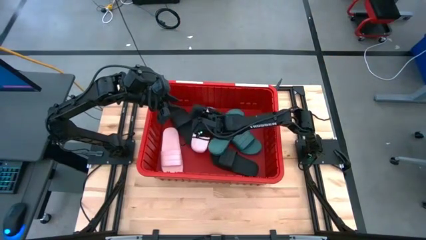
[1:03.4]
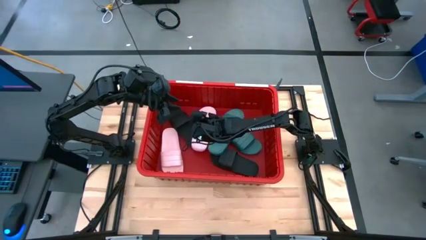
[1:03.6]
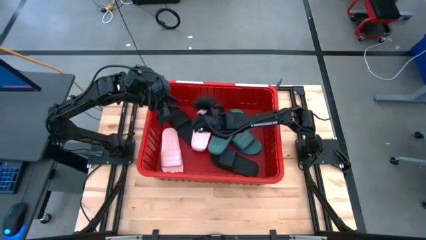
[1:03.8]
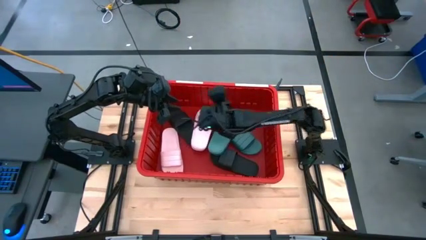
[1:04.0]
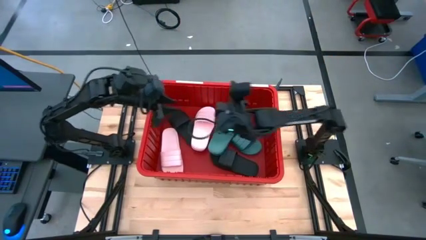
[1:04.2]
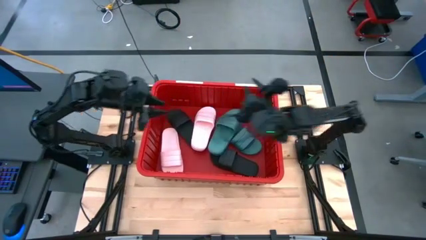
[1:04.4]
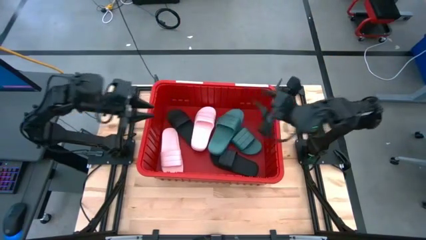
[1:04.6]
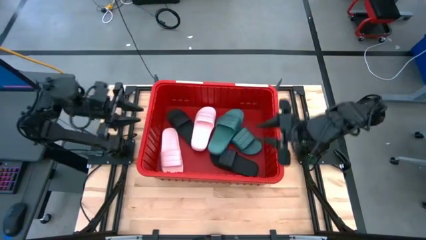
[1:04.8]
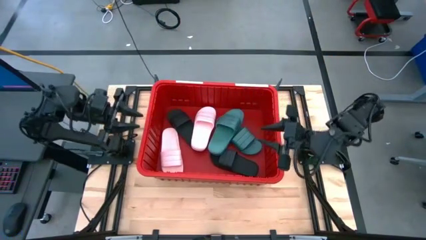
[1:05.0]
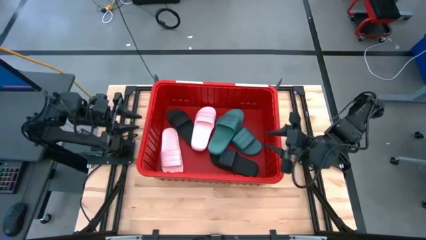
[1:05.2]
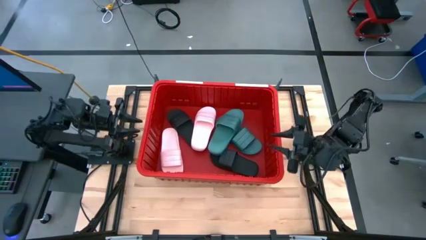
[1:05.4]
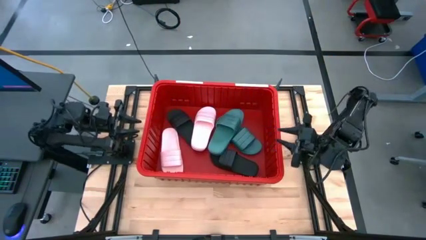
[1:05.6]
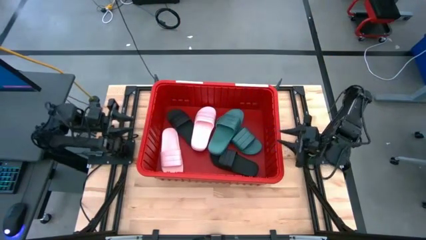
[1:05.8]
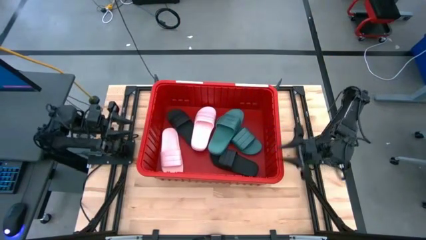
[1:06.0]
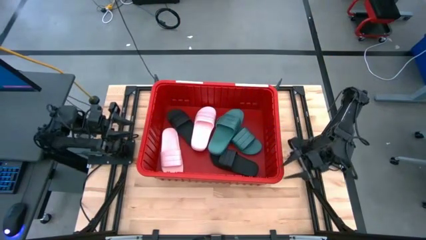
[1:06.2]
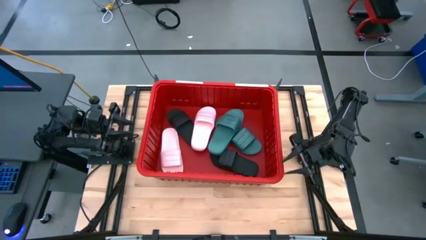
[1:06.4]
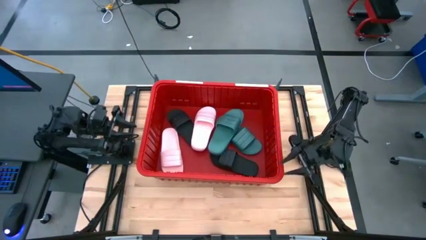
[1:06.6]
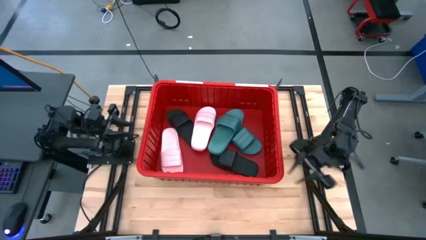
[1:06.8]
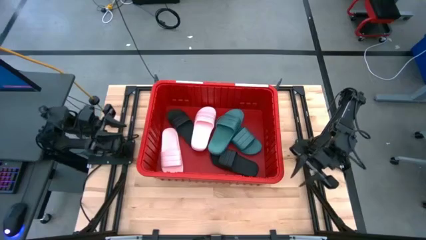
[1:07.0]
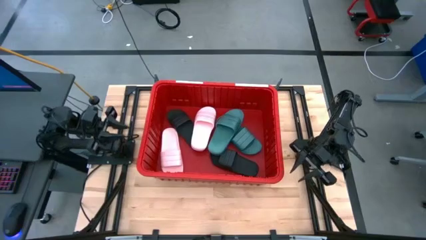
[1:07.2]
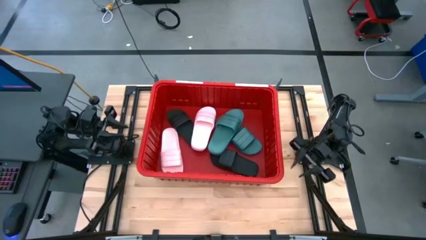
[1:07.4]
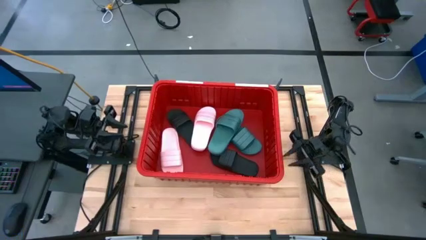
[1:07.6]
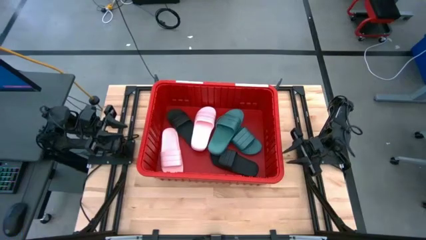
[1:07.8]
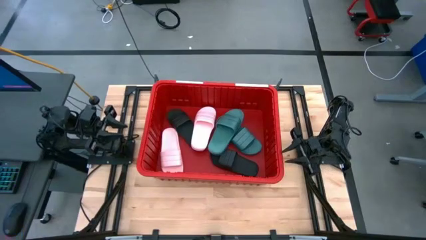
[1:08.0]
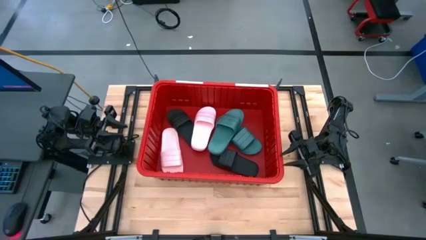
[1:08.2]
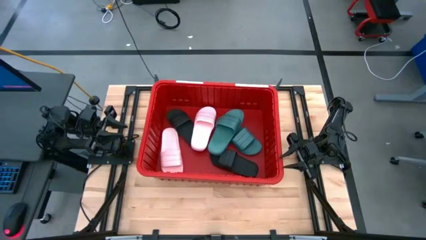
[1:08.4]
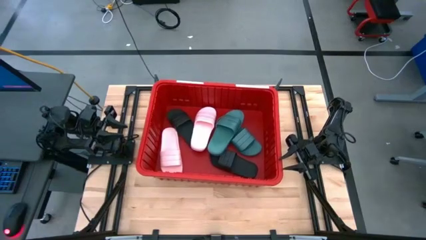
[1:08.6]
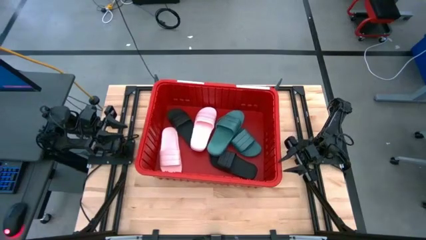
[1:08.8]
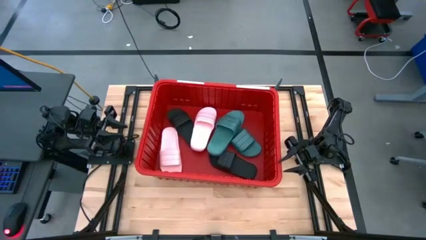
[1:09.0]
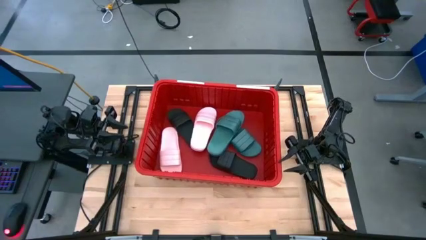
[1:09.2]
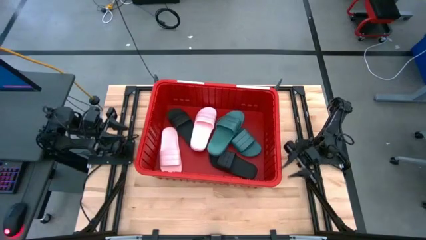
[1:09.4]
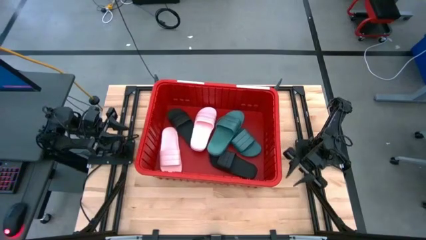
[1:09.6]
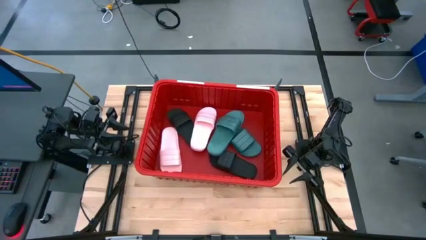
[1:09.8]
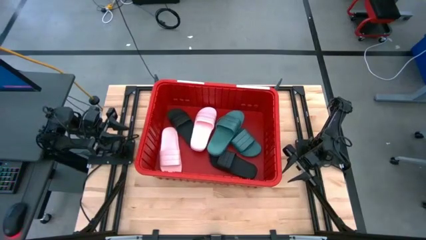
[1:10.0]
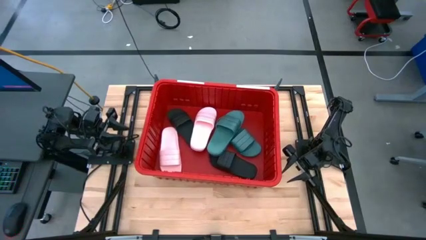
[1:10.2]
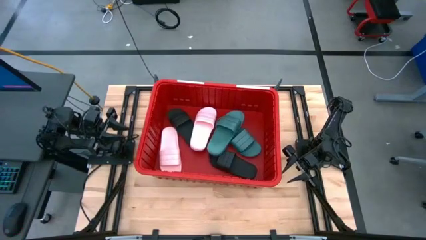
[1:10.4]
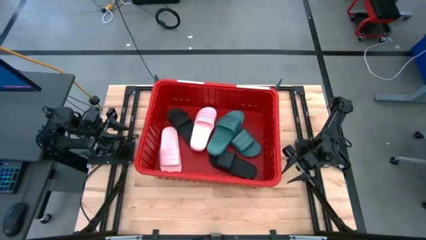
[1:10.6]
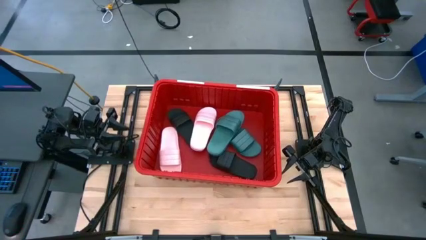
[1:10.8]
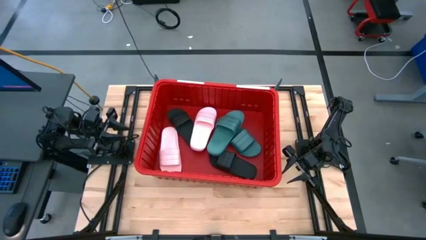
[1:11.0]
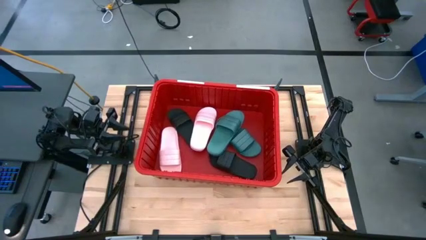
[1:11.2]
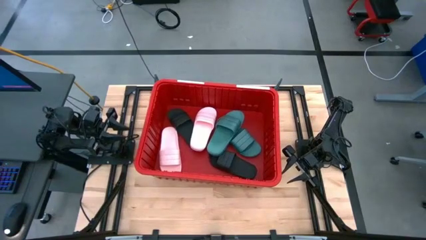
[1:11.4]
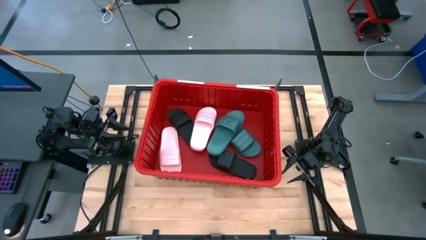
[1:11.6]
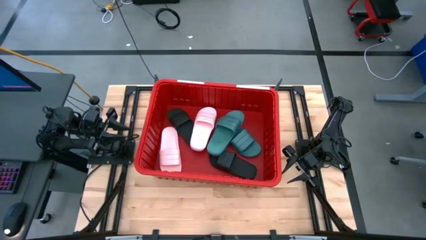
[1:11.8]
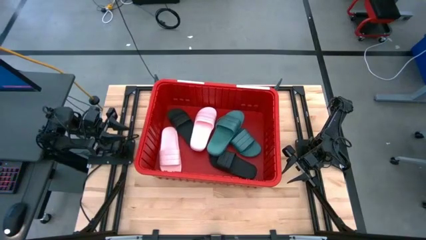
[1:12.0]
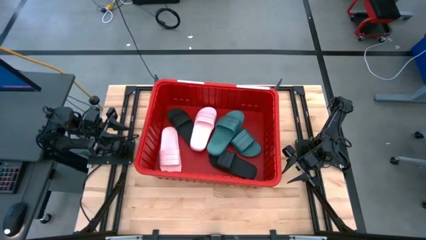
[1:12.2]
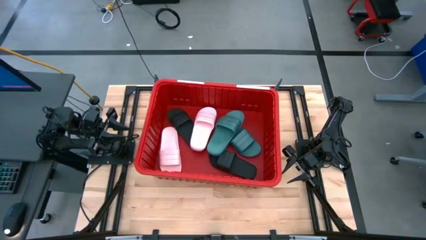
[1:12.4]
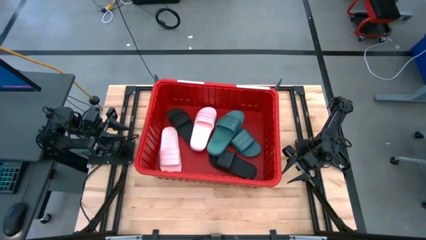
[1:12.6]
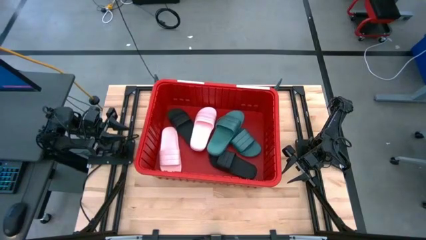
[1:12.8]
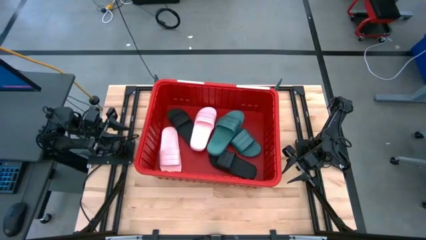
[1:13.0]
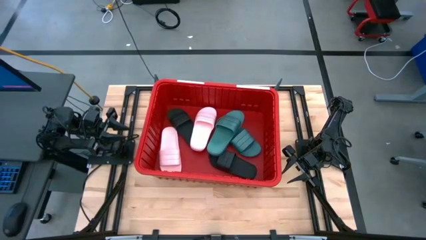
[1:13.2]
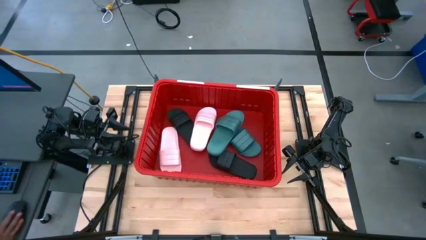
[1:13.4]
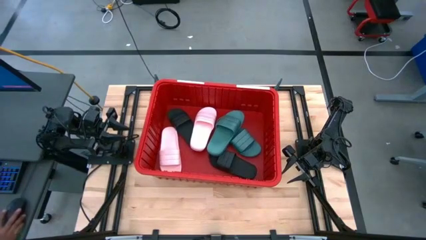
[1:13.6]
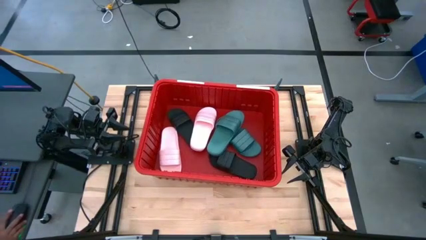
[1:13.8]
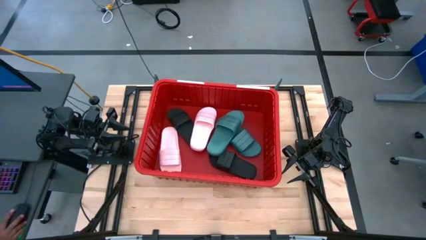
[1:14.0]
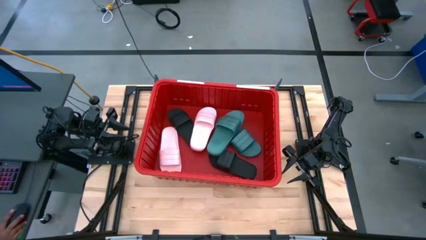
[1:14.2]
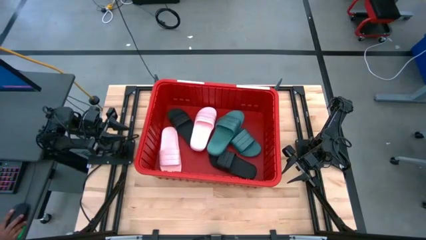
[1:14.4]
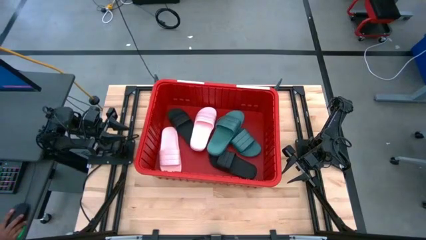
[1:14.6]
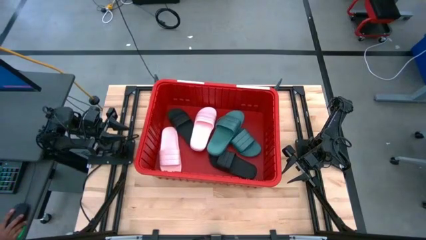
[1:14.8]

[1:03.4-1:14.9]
Task: Pick and place slides into bin
Return to Home Position
